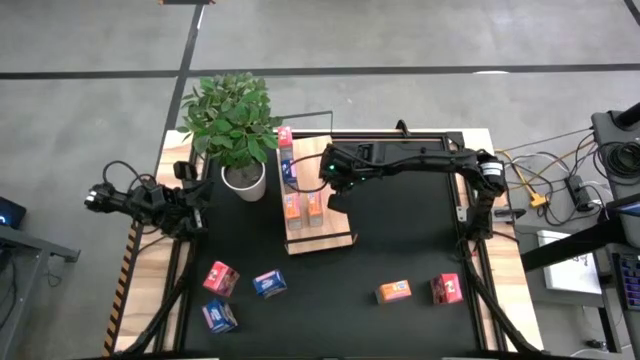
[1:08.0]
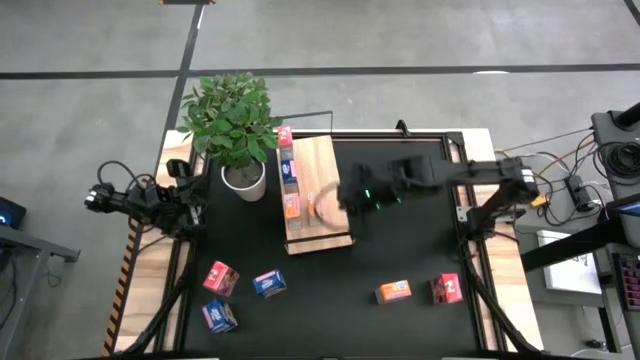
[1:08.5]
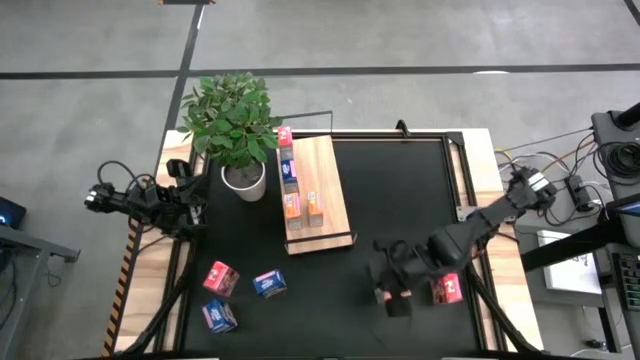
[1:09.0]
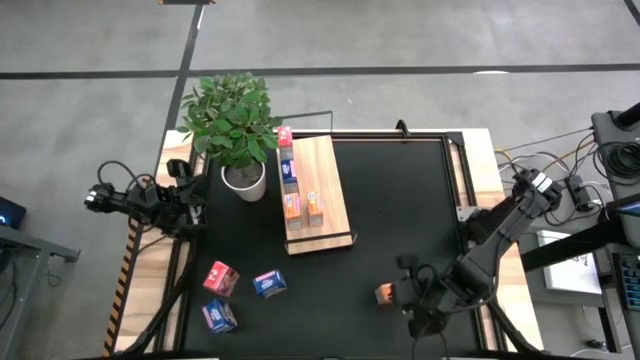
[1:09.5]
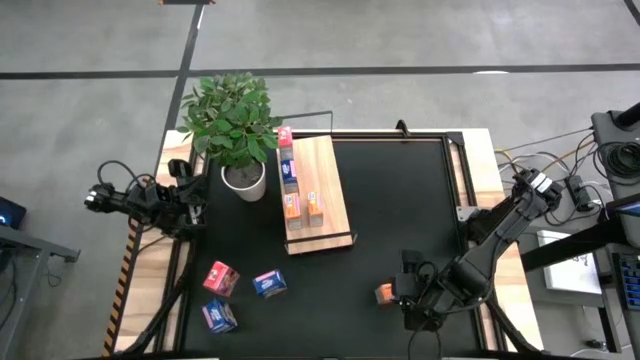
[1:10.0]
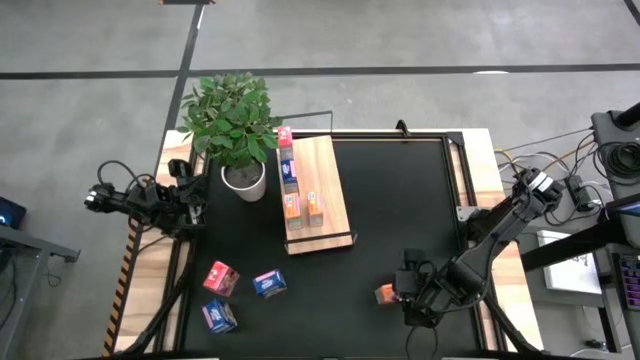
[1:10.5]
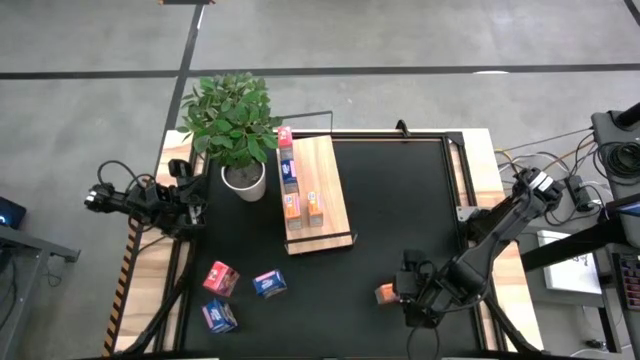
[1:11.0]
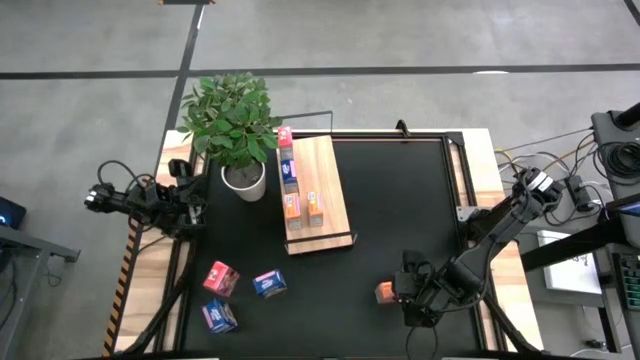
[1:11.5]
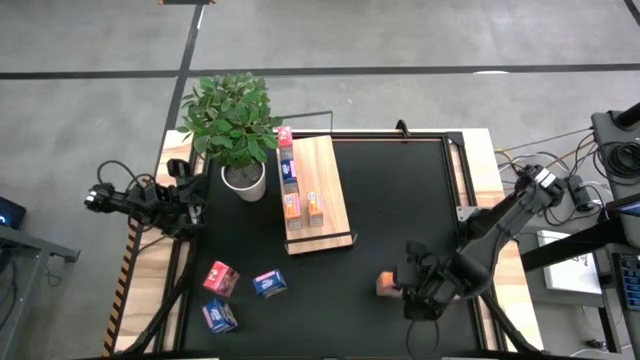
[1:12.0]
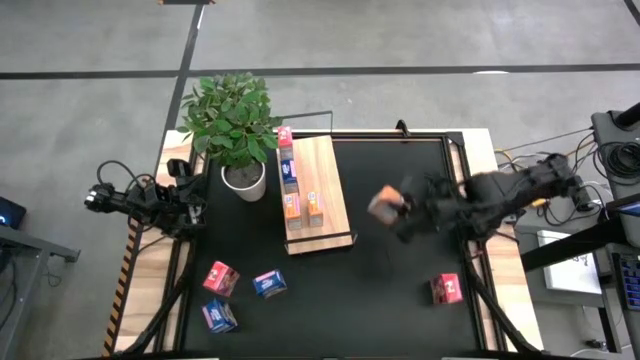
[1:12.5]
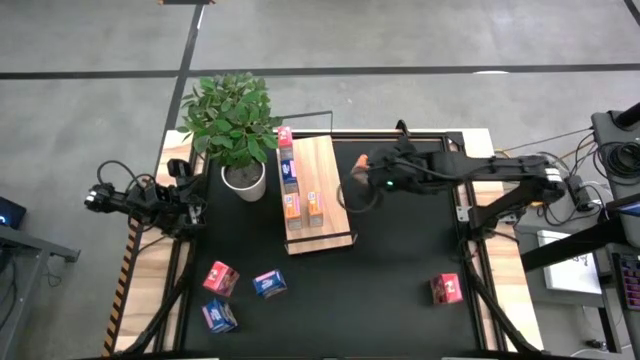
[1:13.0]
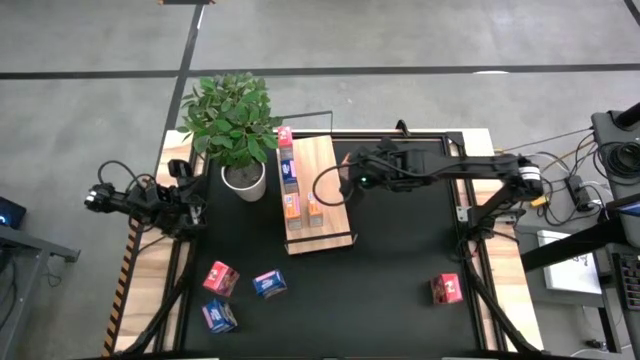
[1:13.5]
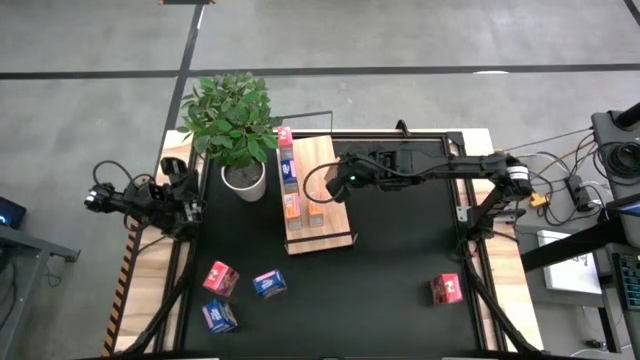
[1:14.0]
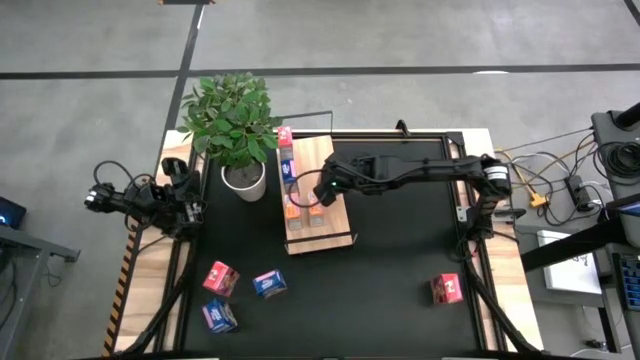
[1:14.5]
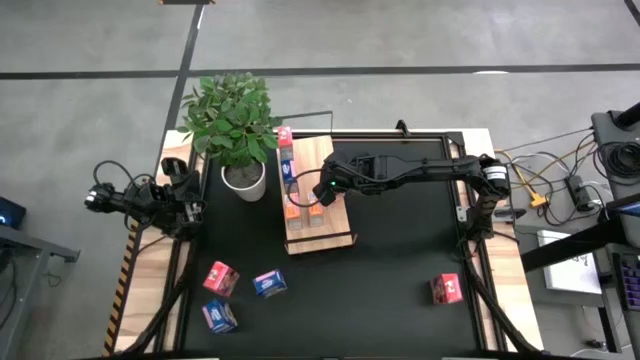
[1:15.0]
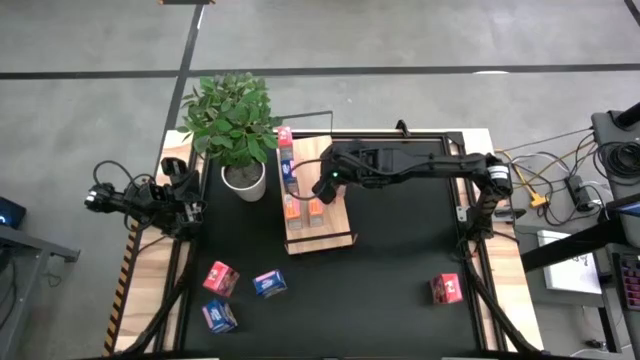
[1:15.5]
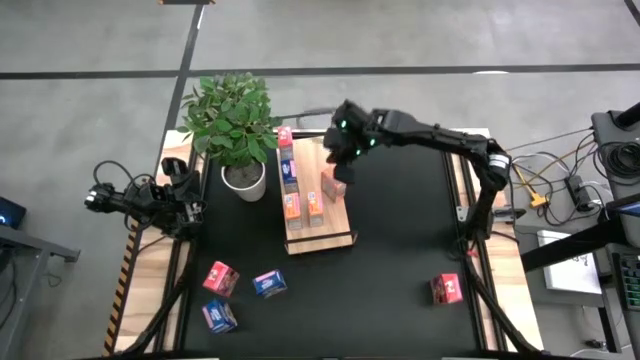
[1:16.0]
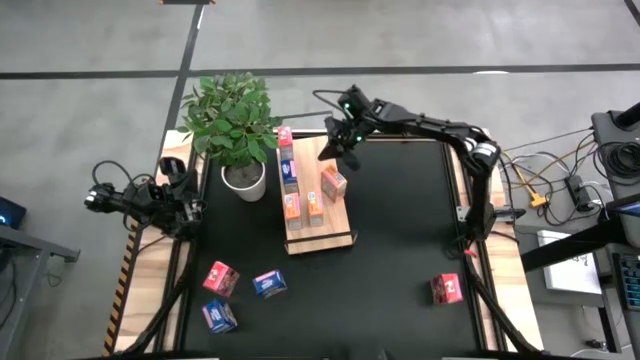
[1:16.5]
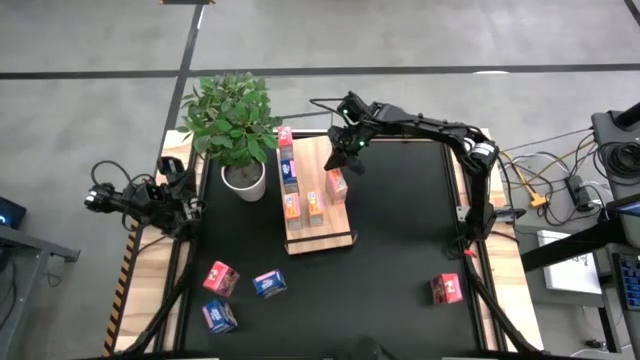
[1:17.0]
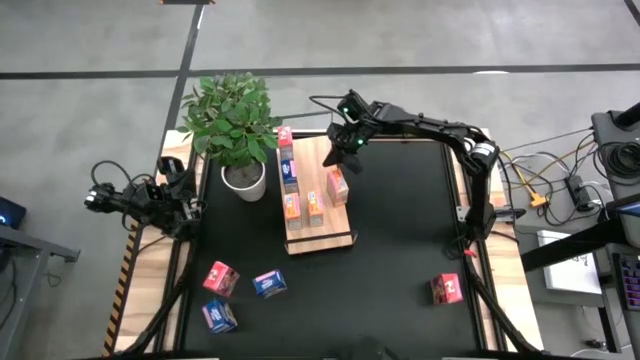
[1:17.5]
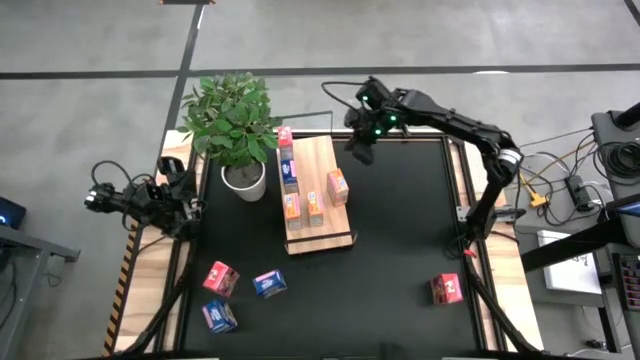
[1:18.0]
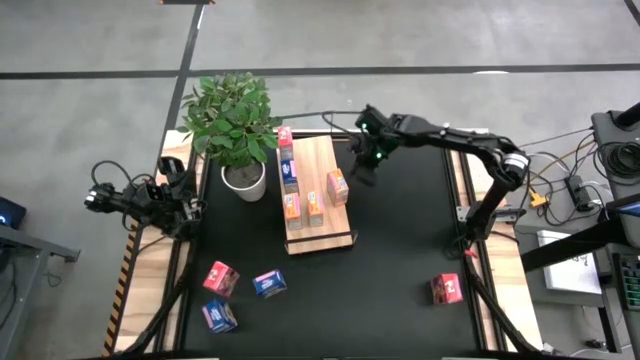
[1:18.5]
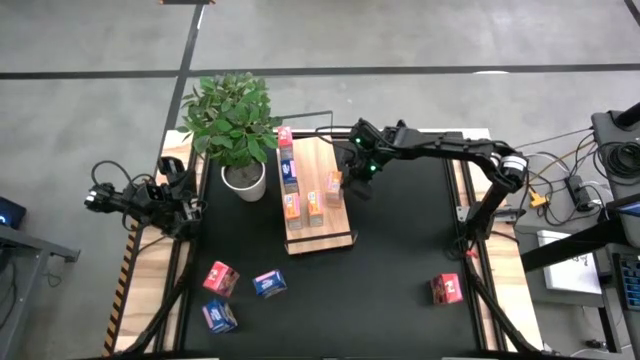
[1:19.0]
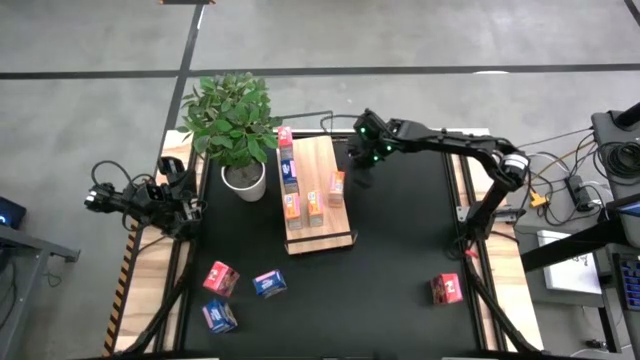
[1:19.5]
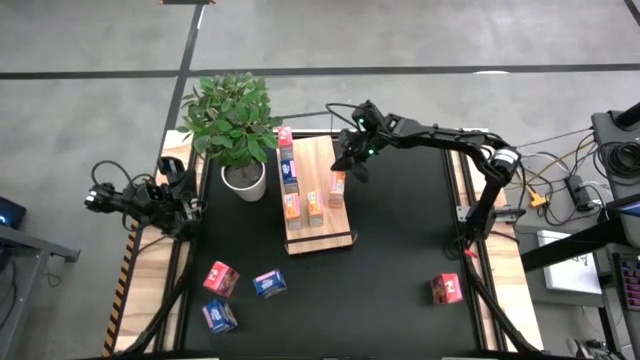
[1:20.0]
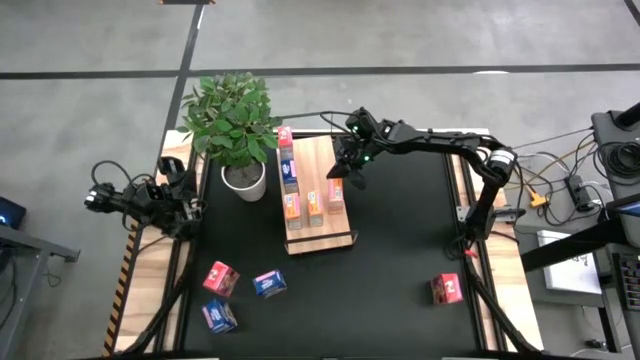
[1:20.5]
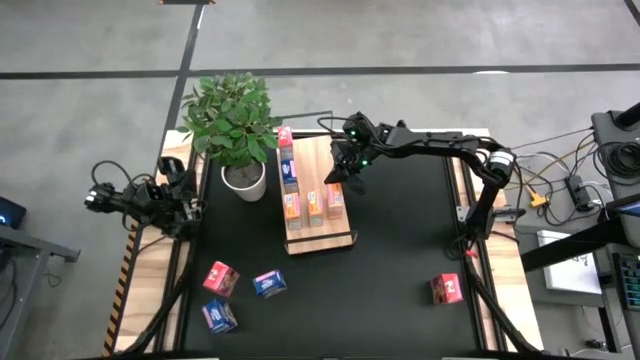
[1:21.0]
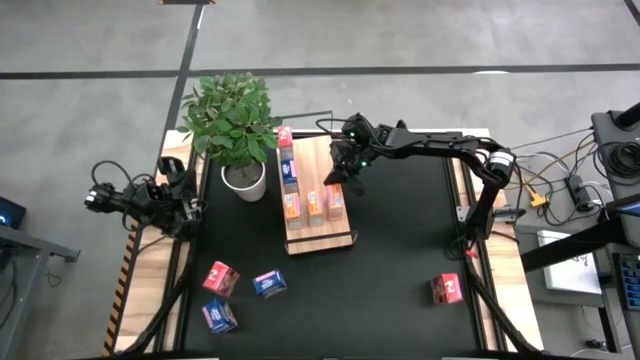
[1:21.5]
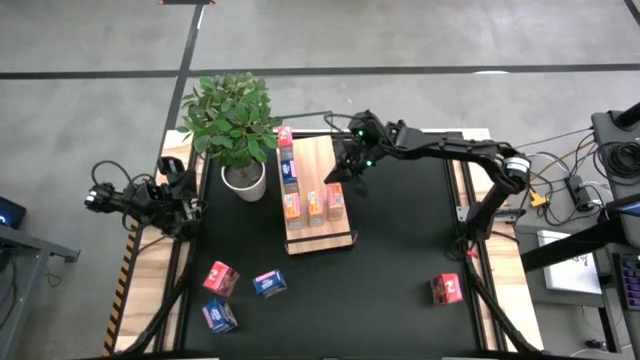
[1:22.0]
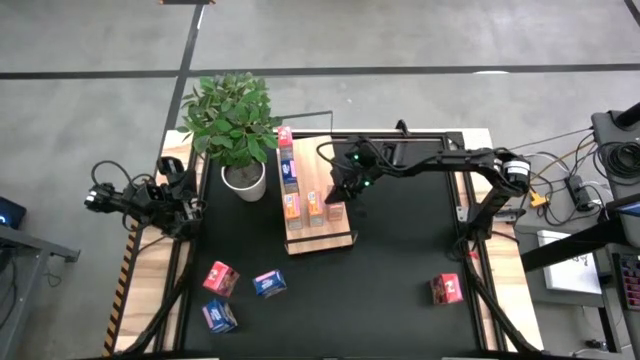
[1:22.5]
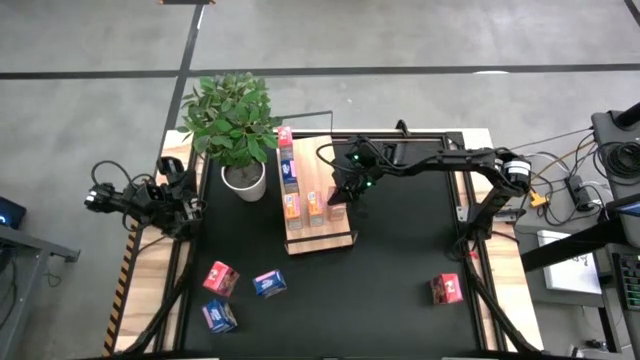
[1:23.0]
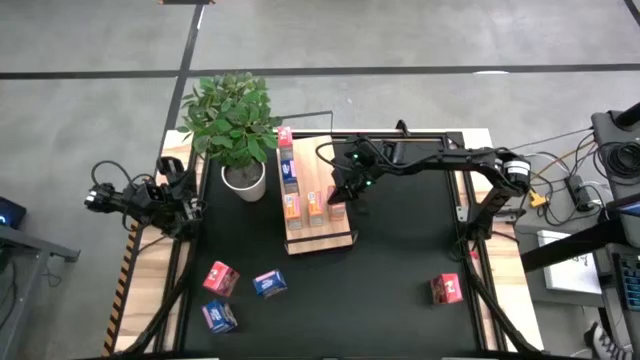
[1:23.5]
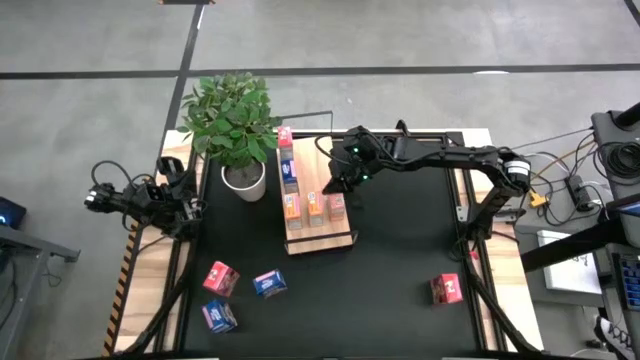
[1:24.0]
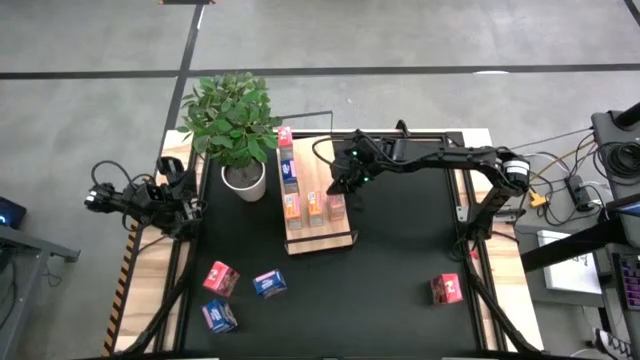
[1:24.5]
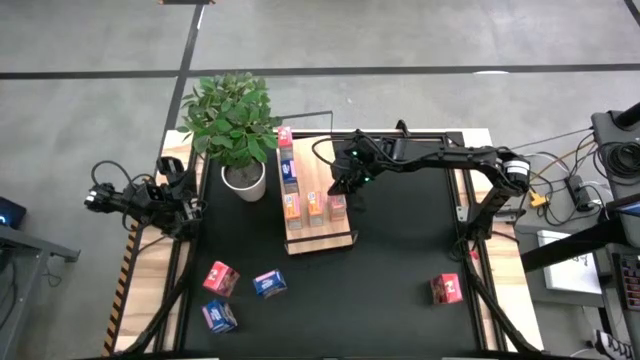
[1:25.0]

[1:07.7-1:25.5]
Task: Stack cereal on shelf
Put the orange cereal box on the shelf aligned with the other orange cereal boxes

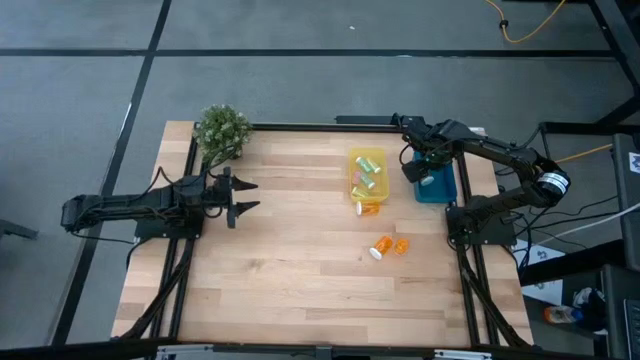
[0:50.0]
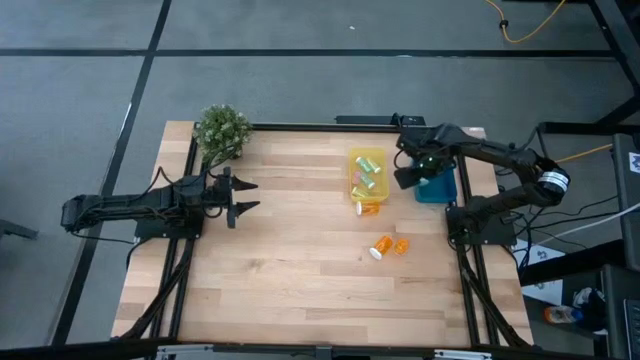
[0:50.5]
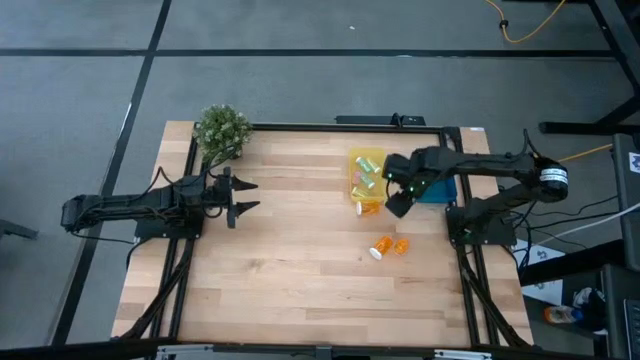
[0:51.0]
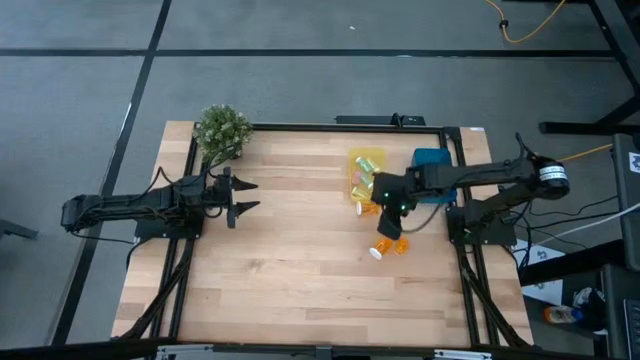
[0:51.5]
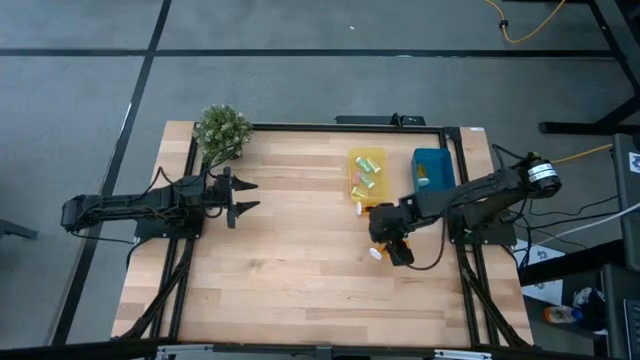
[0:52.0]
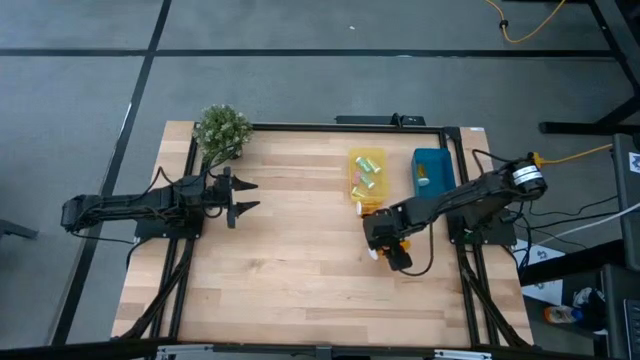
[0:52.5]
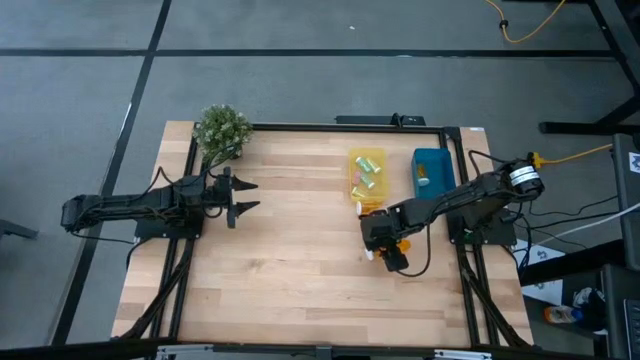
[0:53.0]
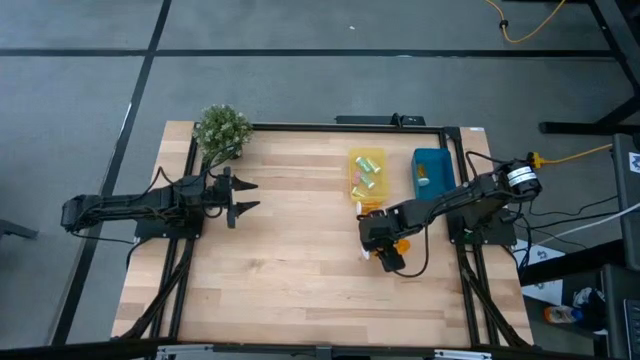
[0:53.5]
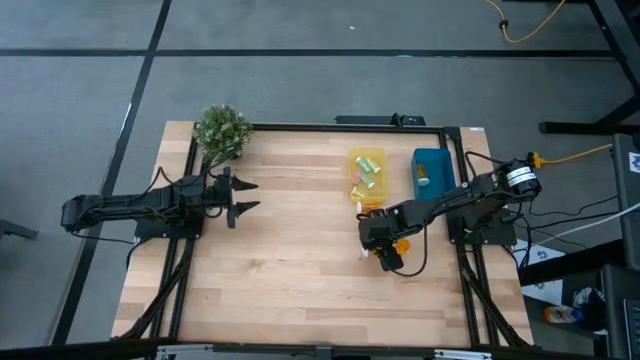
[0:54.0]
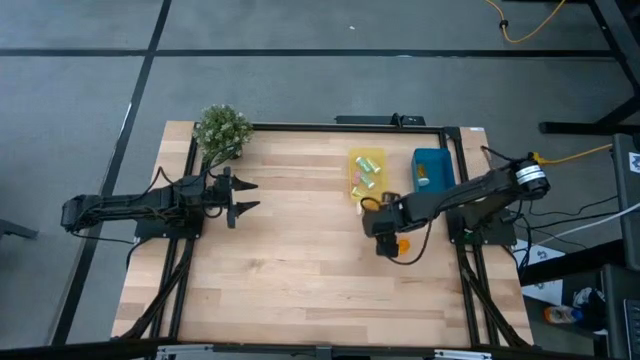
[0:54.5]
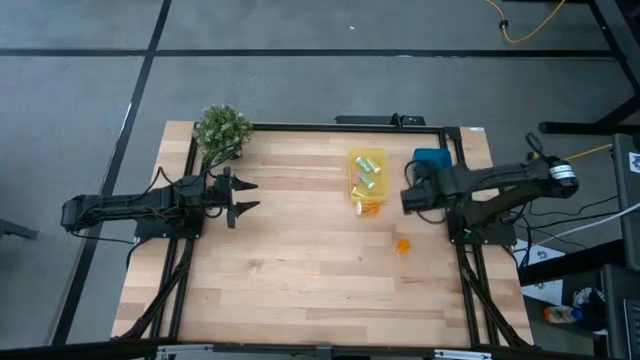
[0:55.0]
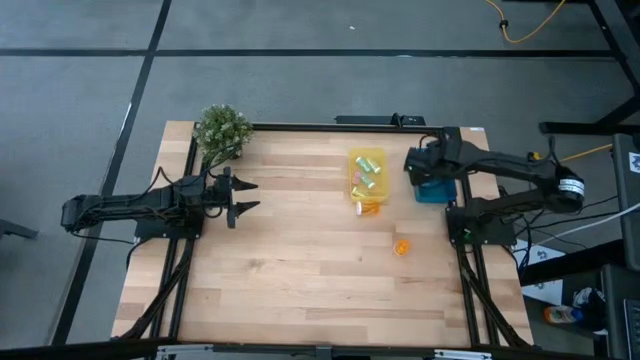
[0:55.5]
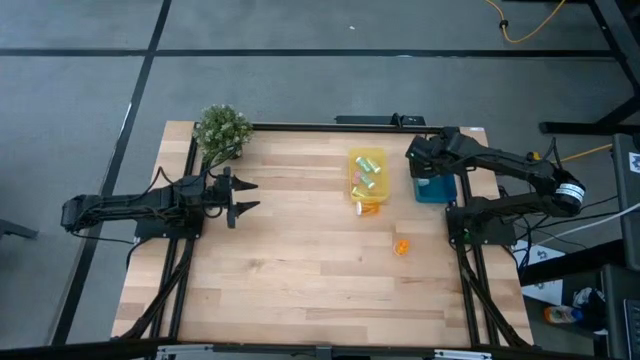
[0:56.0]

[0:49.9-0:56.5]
Task: Pick and place medicine bottles into bin by pill shape (circle, oval)
Put the large orange pill bottle into the blue bin
